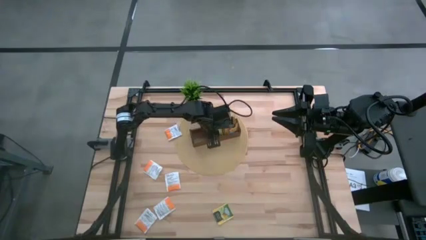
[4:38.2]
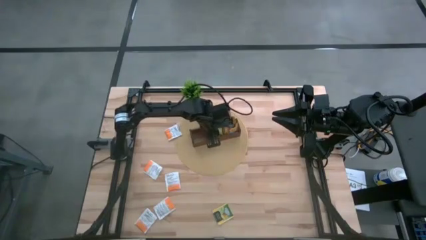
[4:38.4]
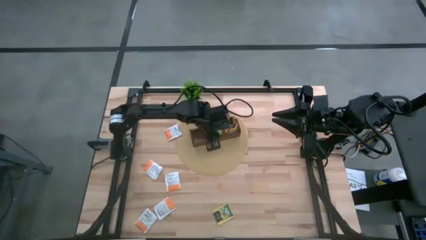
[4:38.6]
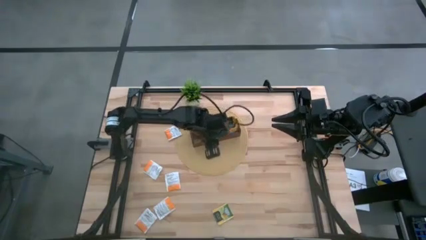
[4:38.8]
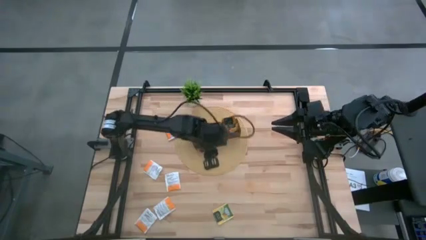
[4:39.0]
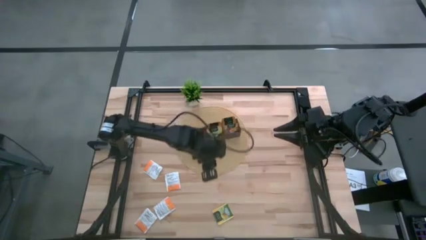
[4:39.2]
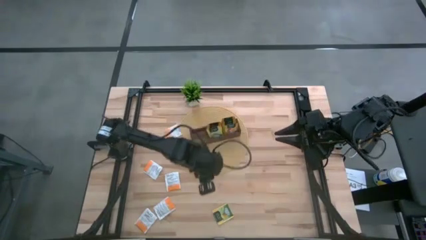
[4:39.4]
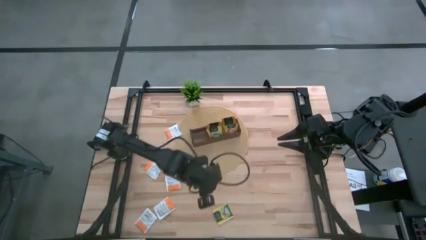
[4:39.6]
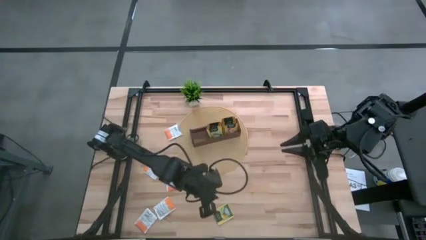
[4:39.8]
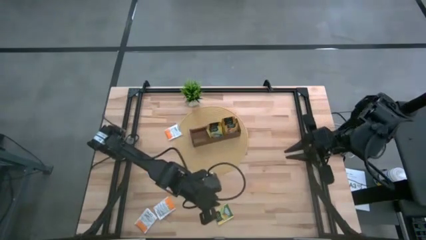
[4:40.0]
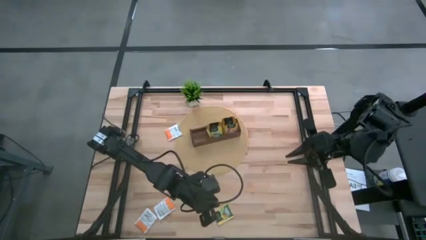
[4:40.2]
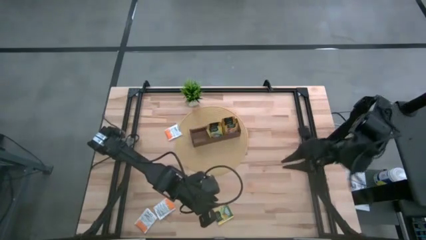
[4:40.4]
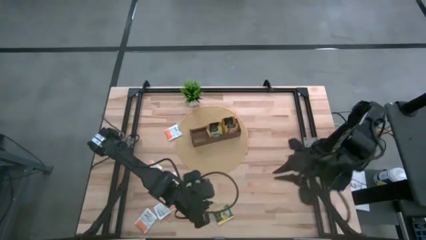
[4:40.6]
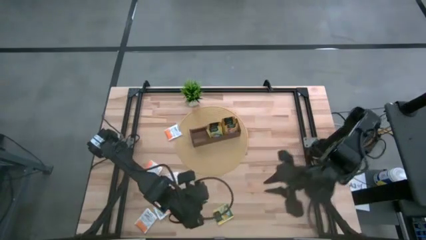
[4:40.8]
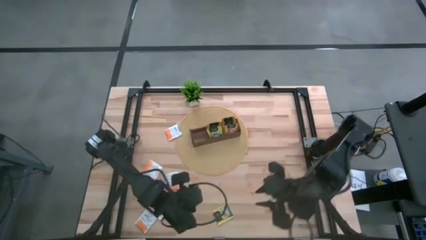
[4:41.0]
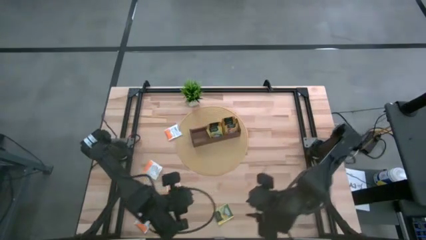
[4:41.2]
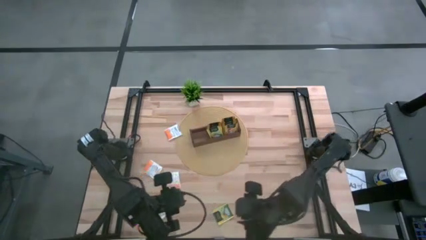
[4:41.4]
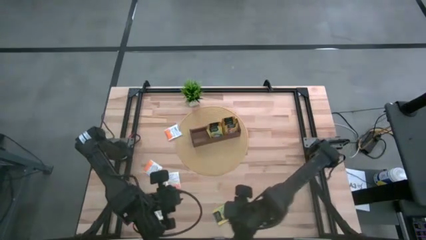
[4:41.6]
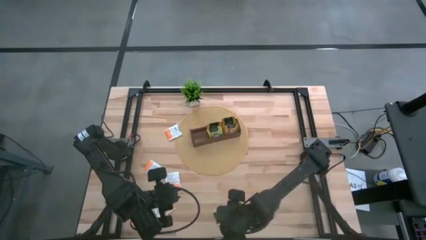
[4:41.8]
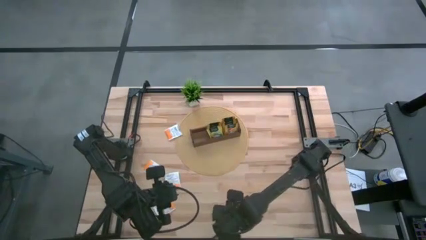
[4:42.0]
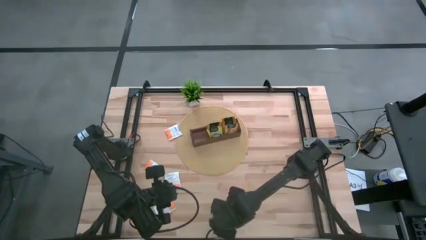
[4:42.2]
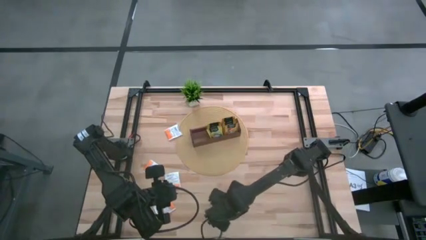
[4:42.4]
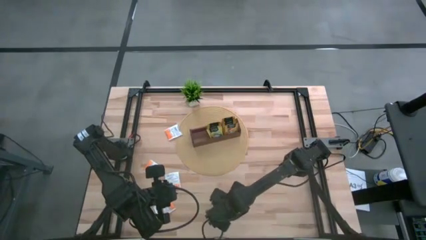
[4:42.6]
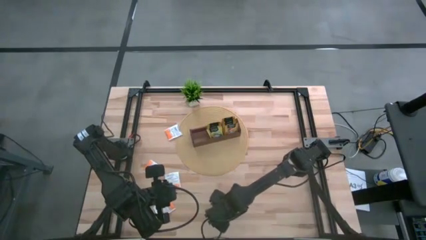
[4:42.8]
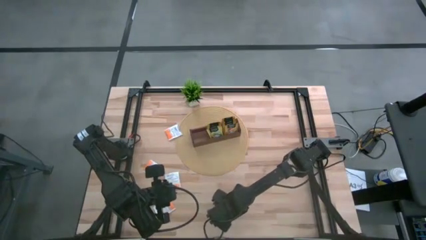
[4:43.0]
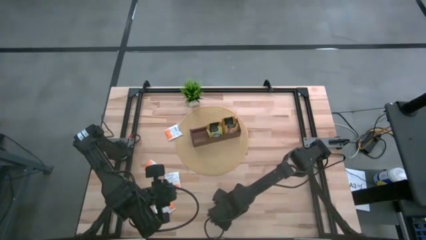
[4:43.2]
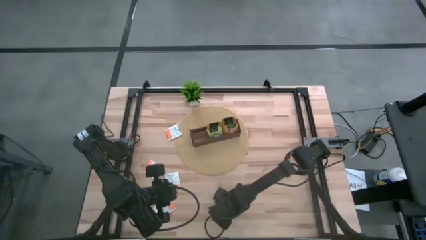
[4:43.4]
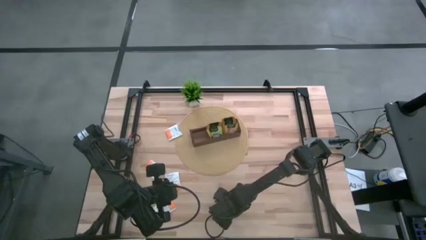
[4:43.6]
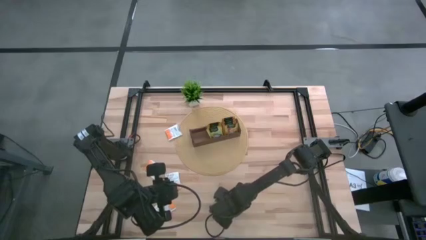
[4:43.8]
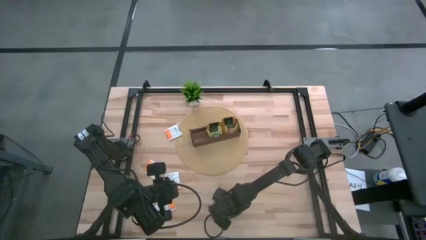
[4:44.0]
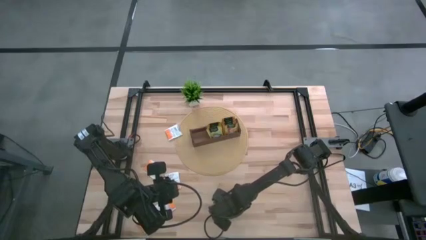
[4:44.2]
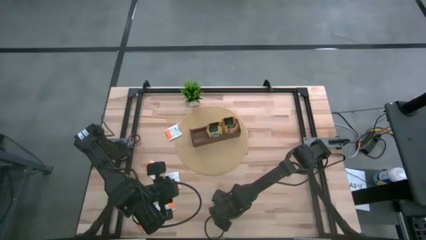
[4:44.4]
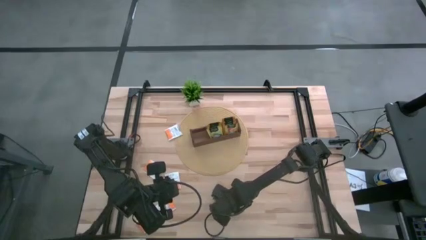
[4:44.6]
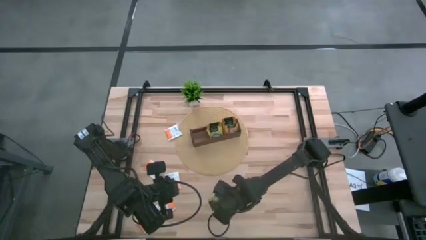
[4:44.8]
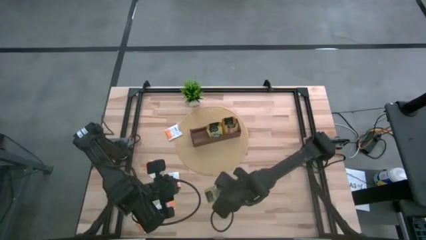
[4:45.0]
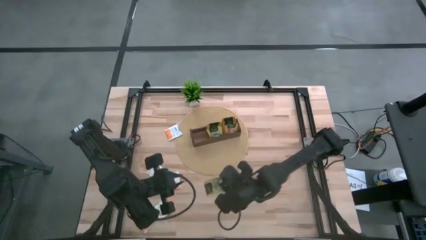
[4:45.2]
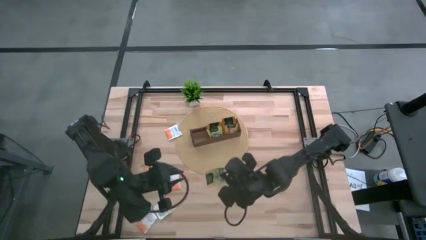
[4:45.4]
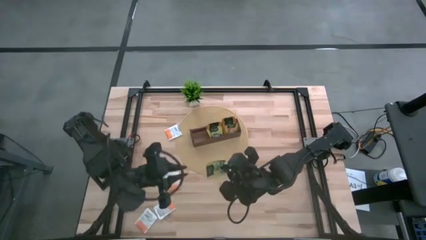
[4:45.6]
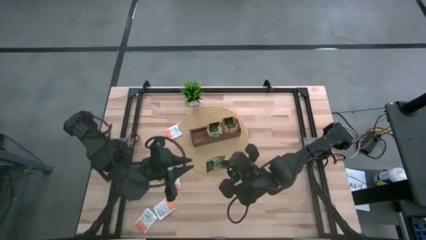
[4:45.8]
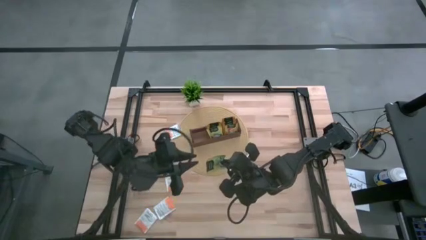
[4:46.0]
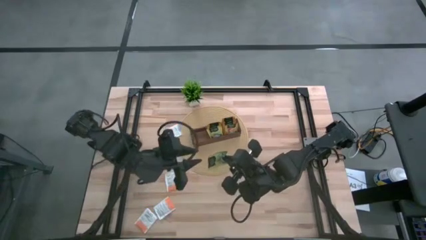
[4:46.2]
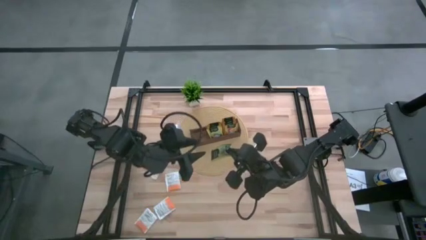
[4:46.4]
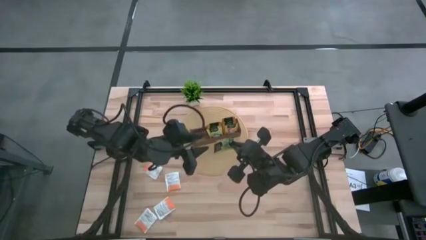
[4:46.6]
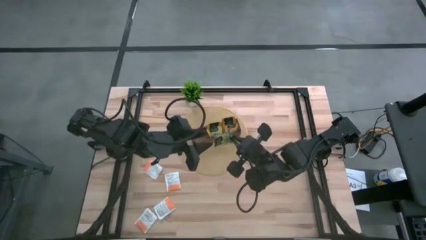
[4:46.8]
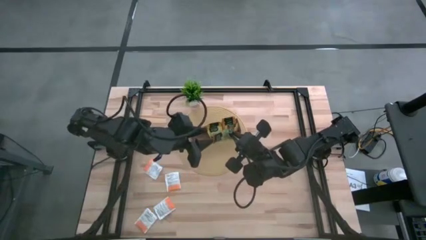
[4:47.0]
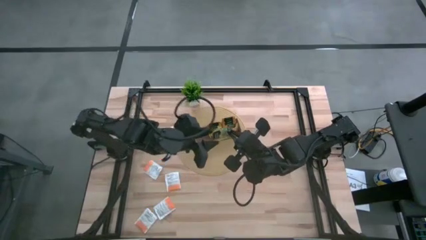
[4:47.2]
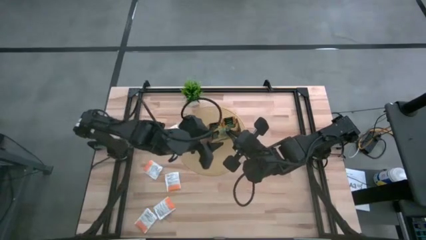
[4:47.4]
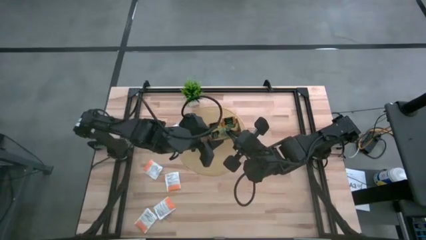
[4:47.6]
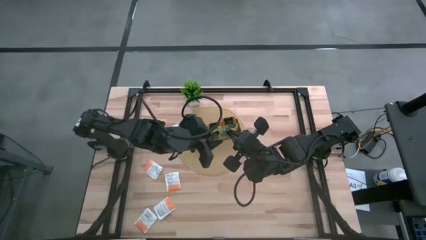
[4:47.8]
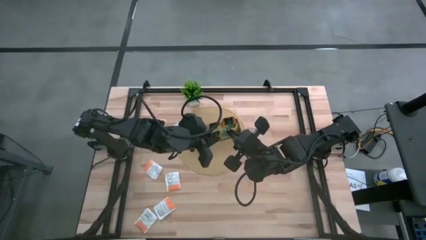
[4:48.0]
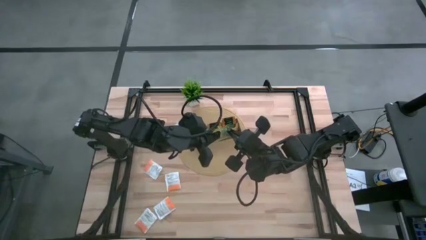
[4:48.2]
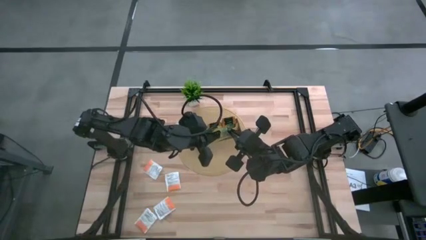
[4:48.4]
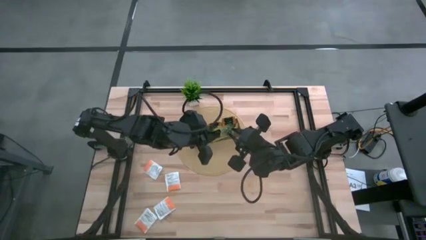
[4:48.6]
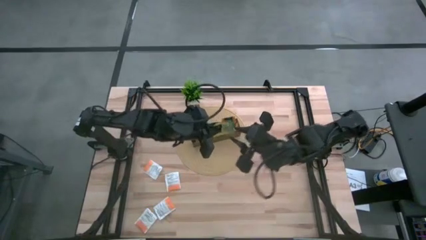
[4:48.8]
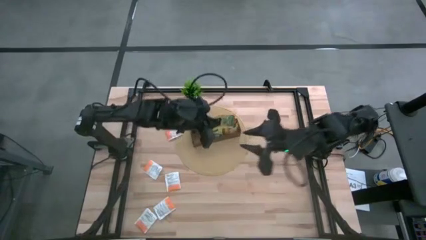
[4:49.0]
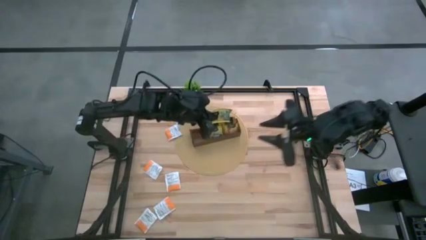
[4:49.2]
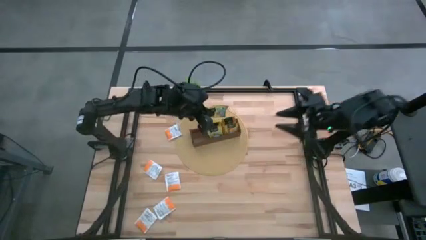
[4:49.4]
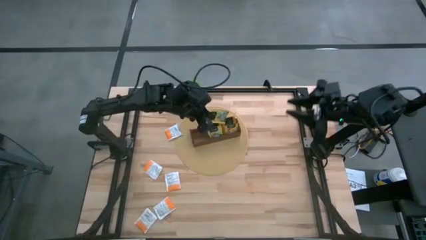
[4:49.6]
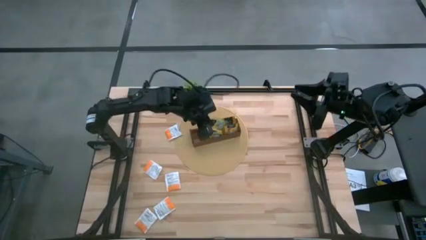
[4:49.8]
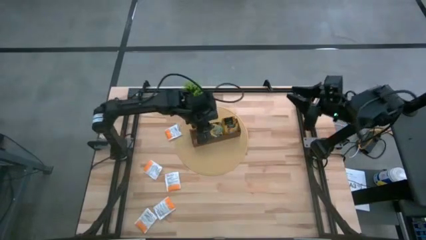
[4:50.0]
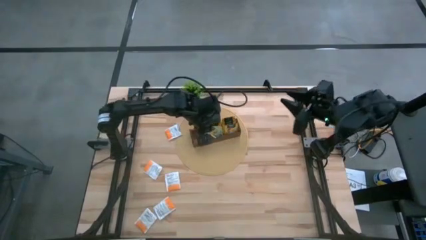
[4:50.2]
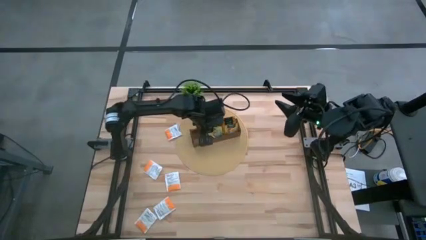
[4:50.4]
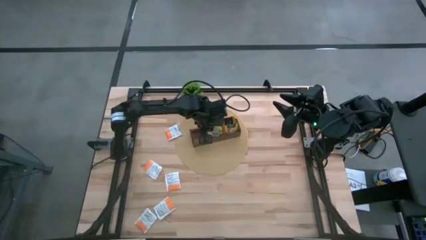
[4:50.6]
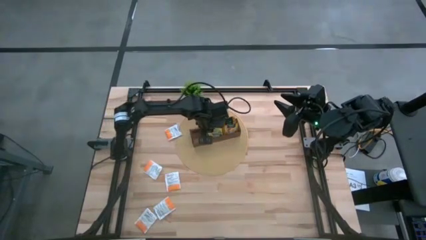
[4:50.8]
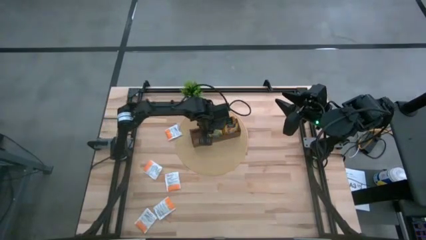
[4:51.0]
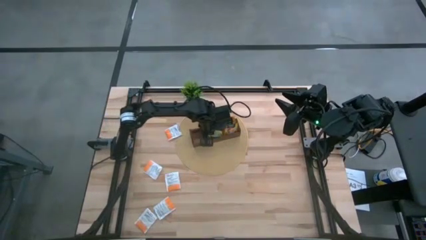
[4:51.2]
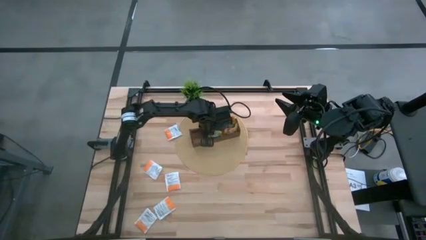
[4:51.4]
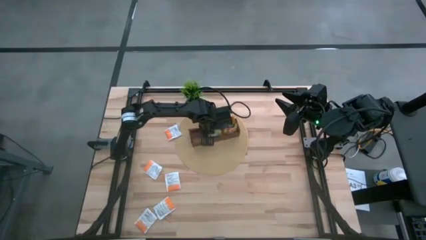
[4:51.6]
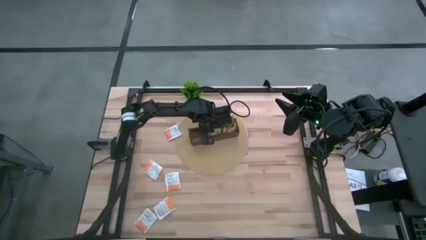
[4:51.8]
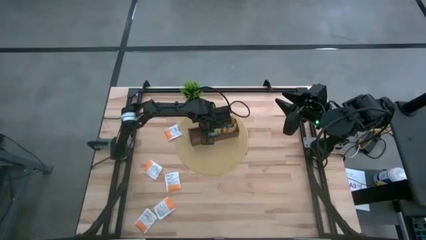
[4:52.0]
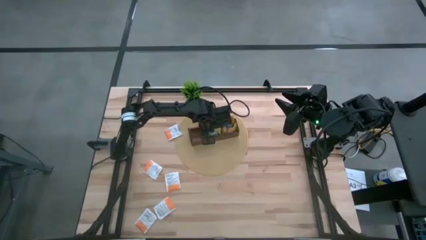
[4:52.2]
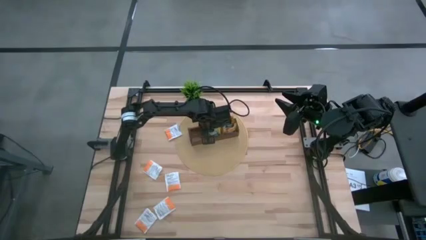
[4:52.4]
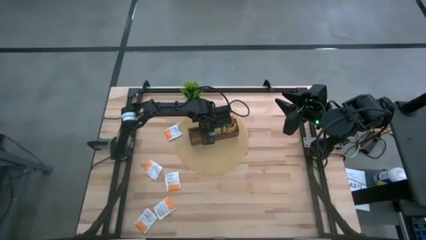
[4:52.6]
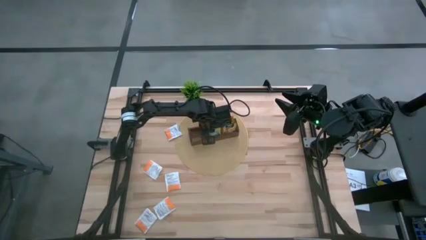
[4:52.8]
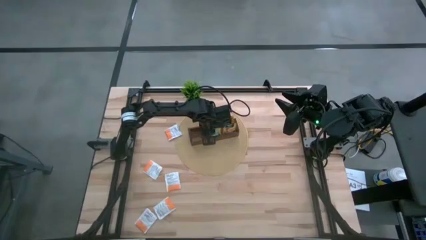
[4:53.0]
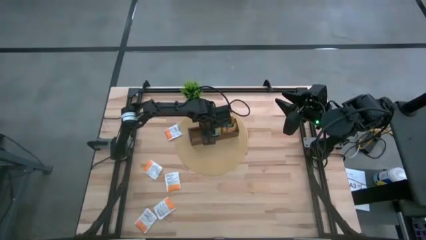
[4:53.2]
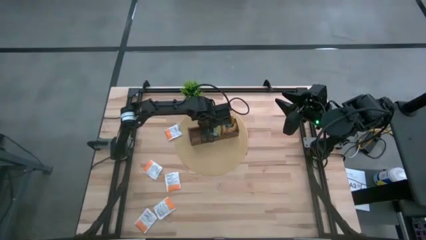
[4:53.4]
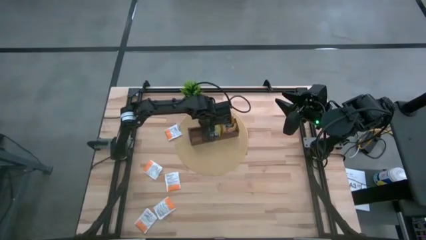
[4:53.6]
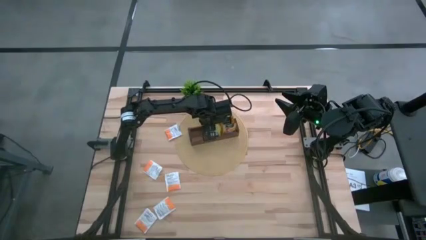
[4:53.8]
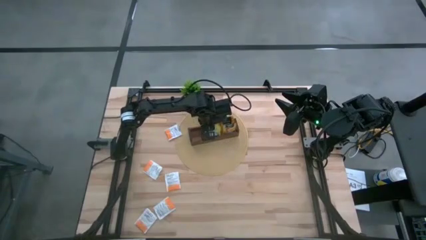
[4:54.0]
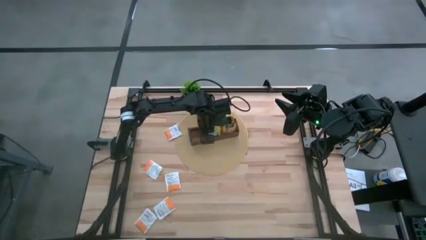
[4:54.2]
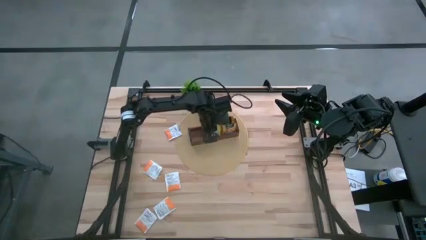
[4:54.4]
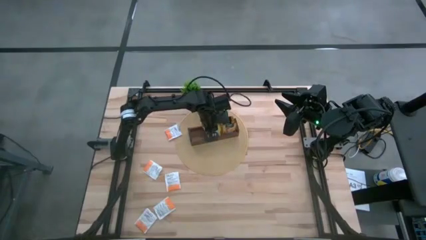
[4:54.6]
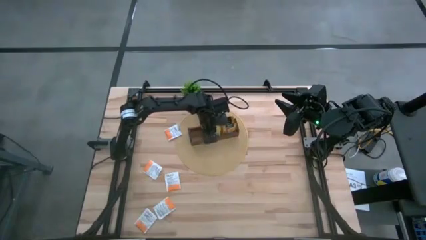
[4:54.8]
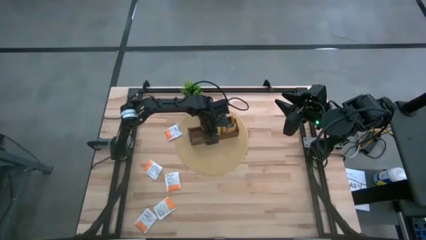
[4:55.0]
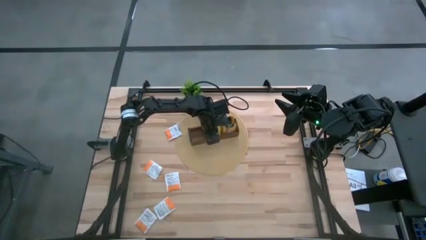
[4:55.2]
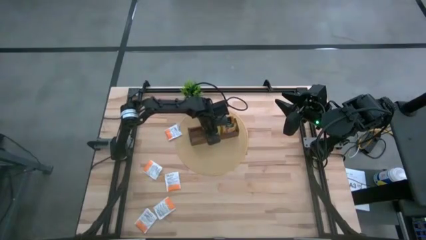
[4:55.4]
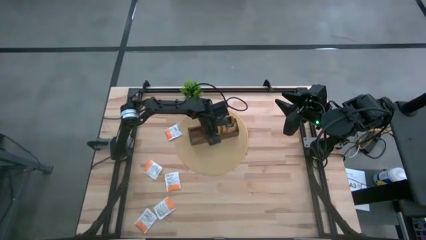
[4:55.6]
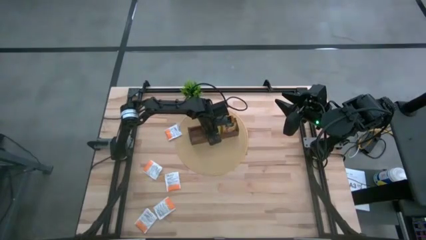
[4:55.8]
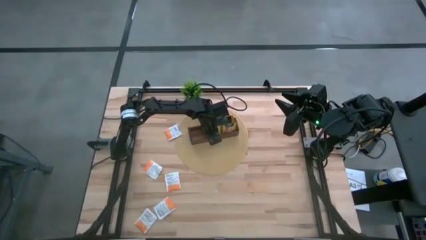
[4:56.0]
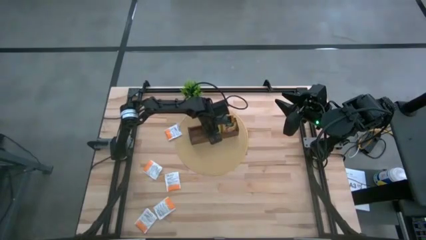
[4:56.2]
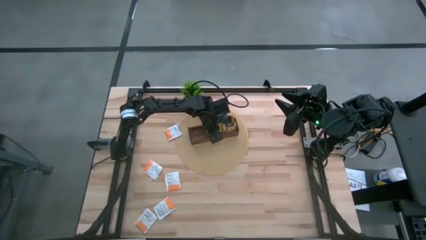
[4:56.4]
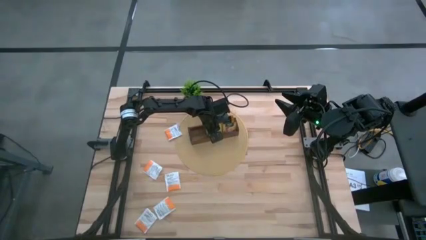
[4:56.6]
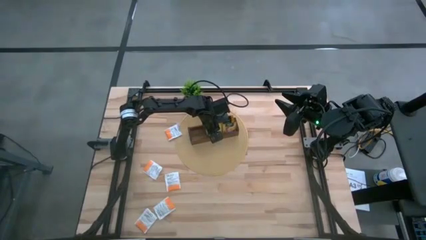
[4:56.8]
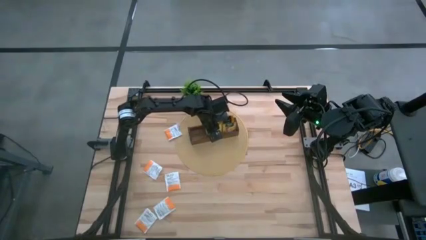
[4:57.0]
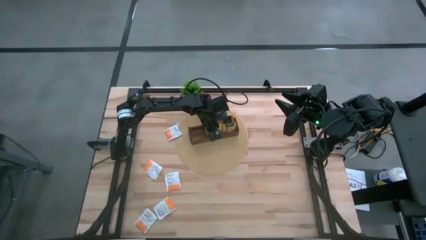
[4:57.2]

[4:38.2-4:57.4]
Task: Pick & Place Tea
Put the yellow tea bag into the middle section of the wooden organizer
